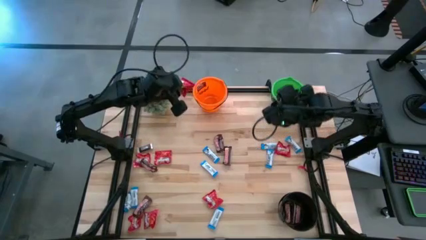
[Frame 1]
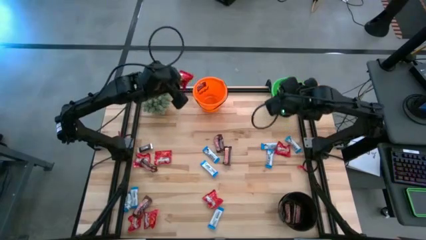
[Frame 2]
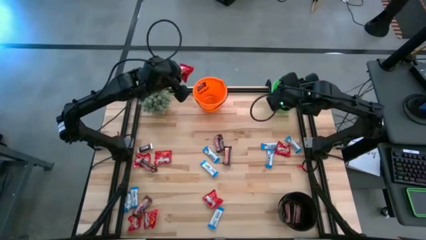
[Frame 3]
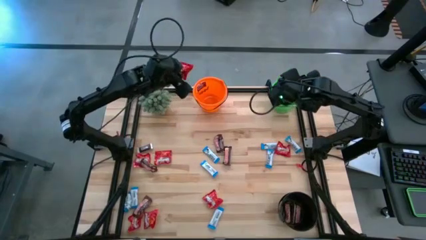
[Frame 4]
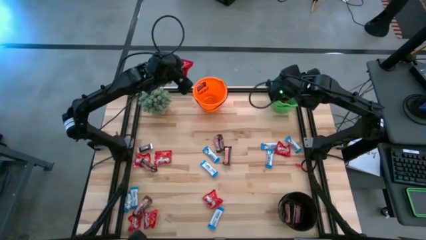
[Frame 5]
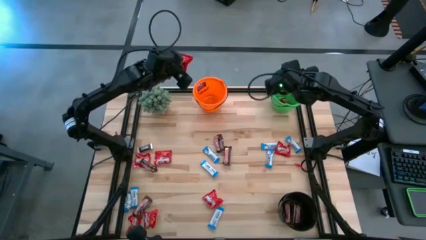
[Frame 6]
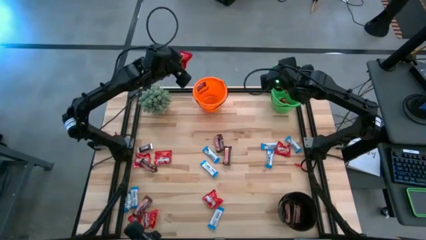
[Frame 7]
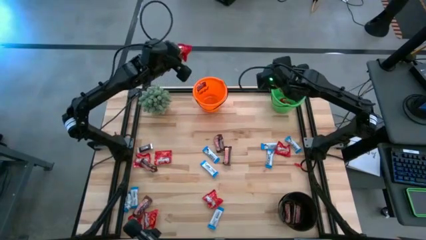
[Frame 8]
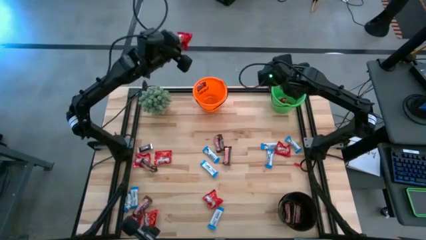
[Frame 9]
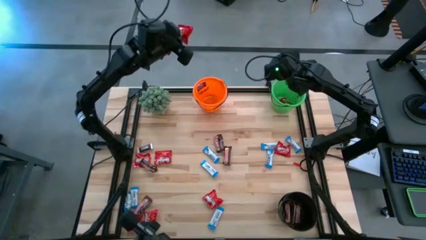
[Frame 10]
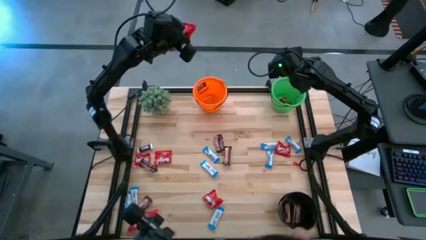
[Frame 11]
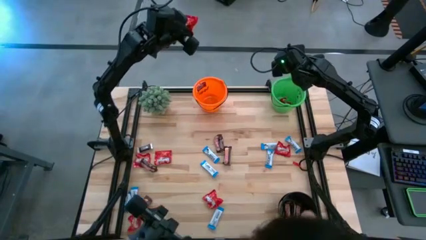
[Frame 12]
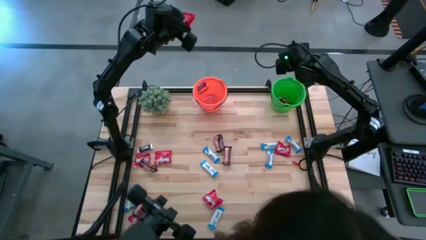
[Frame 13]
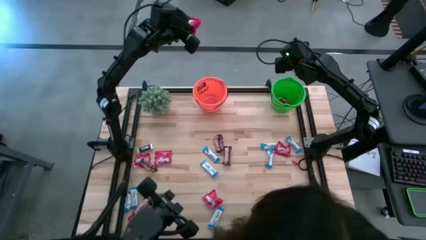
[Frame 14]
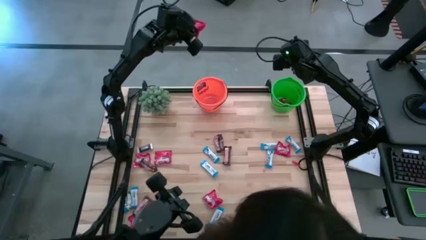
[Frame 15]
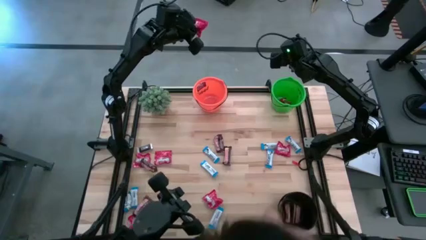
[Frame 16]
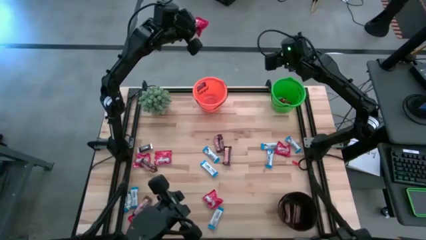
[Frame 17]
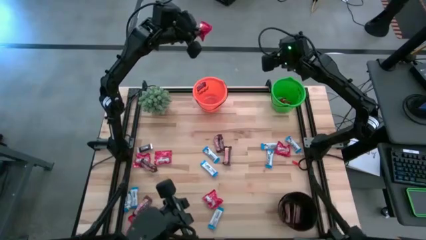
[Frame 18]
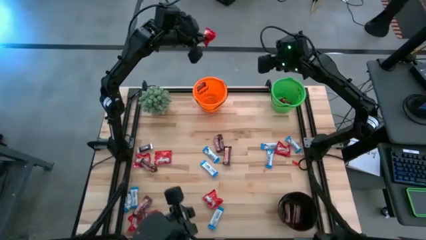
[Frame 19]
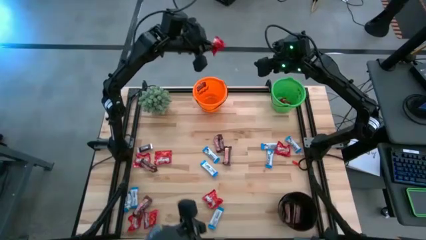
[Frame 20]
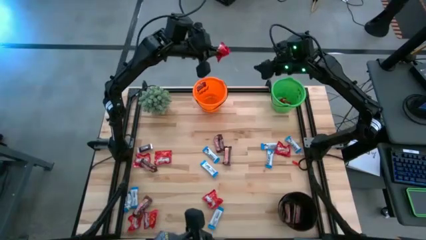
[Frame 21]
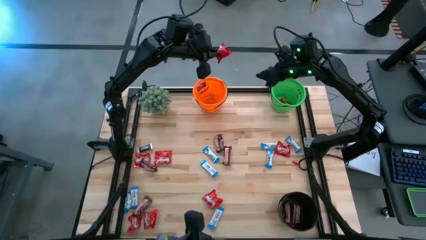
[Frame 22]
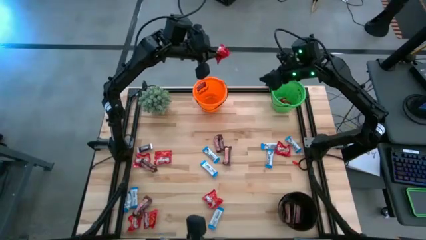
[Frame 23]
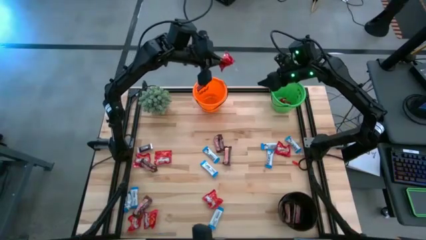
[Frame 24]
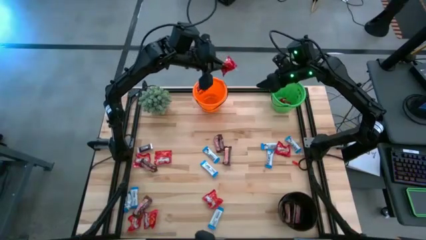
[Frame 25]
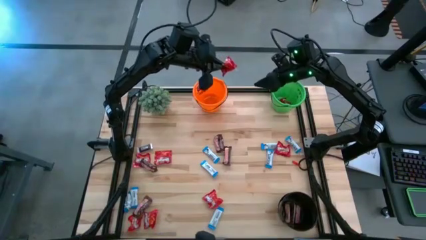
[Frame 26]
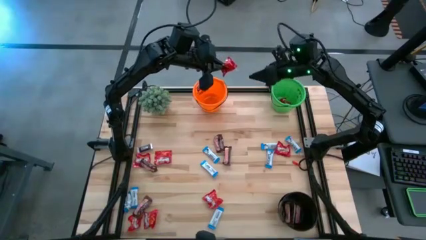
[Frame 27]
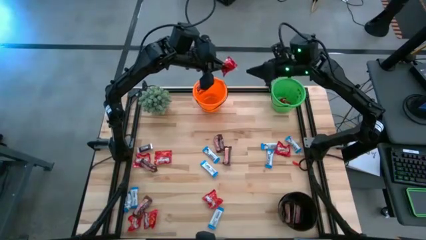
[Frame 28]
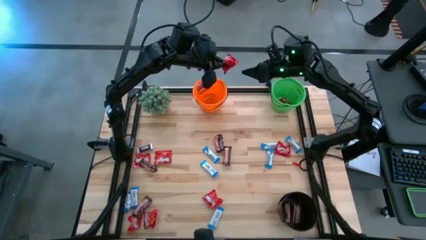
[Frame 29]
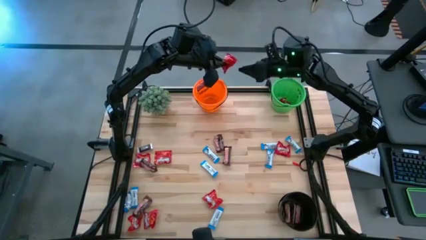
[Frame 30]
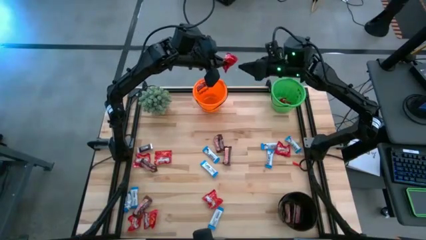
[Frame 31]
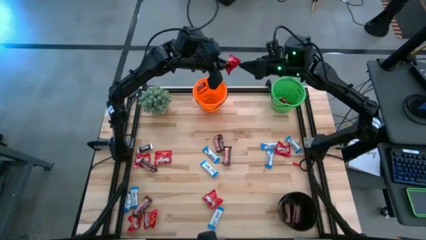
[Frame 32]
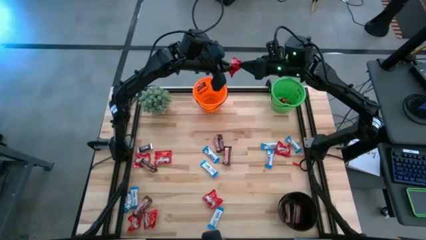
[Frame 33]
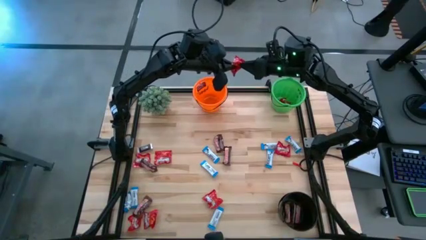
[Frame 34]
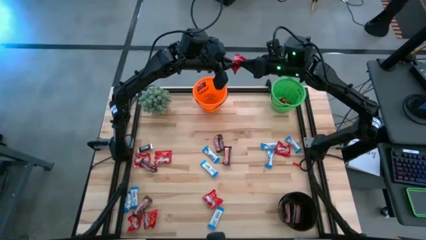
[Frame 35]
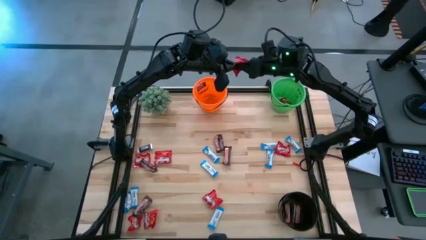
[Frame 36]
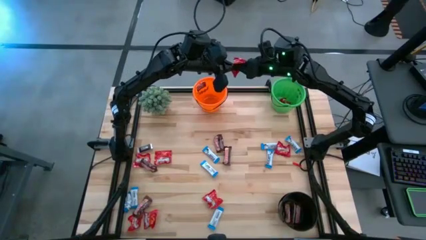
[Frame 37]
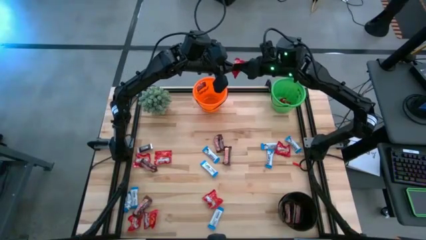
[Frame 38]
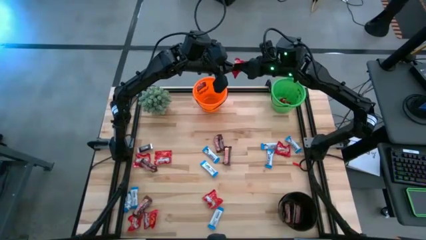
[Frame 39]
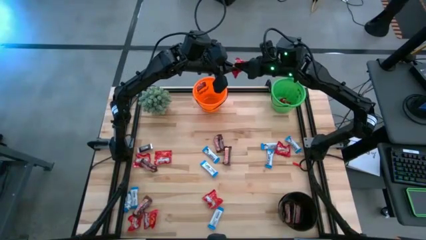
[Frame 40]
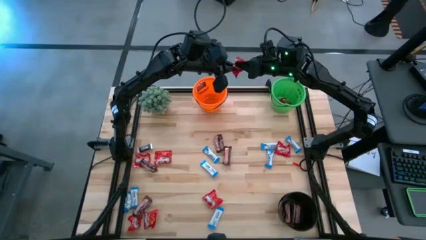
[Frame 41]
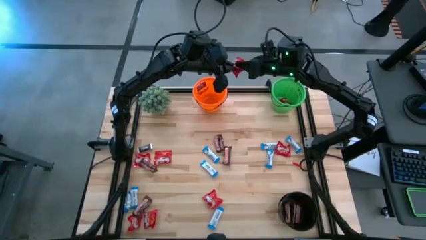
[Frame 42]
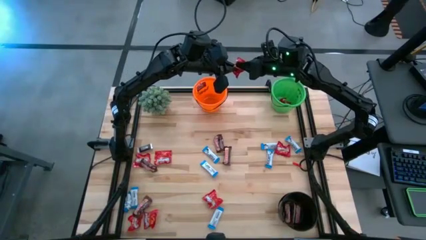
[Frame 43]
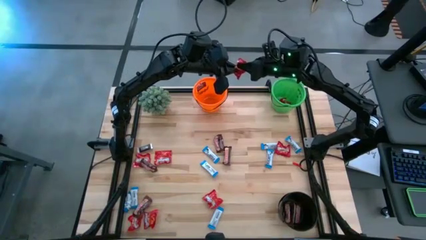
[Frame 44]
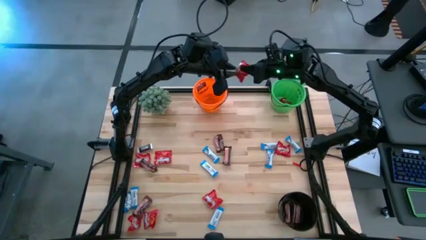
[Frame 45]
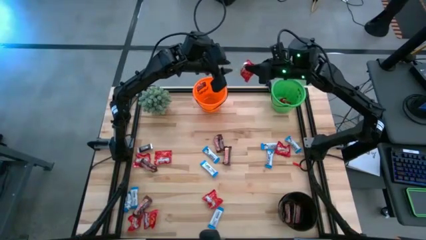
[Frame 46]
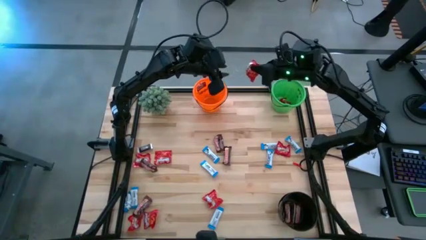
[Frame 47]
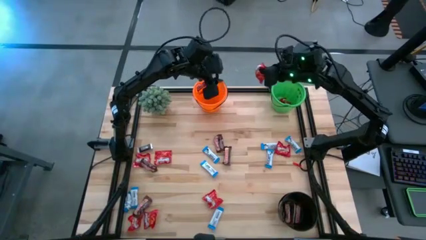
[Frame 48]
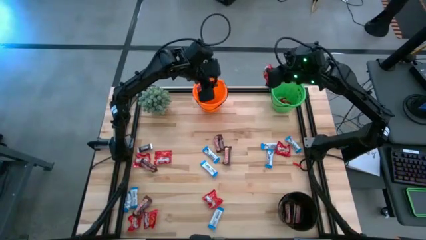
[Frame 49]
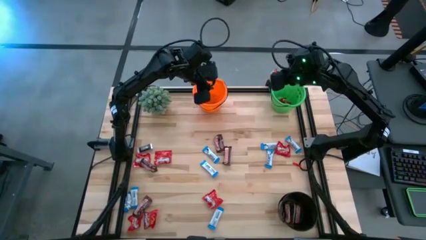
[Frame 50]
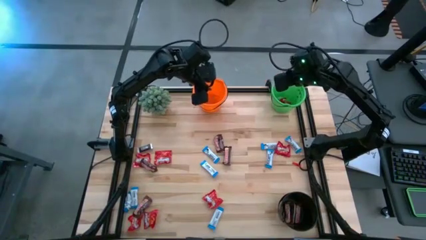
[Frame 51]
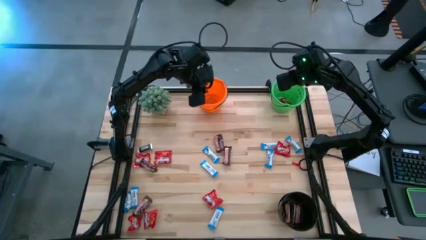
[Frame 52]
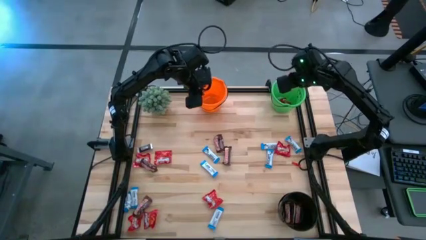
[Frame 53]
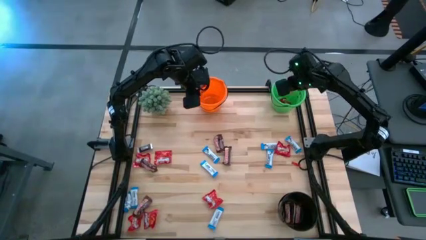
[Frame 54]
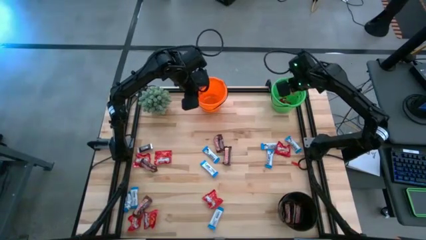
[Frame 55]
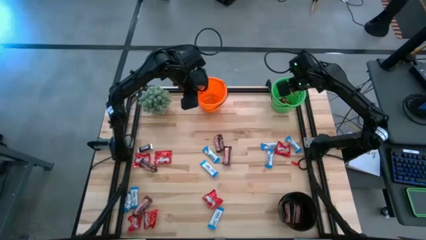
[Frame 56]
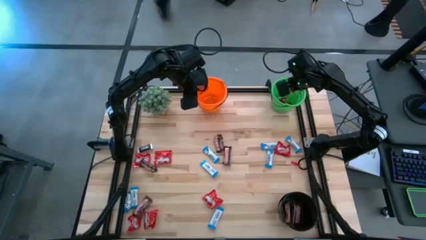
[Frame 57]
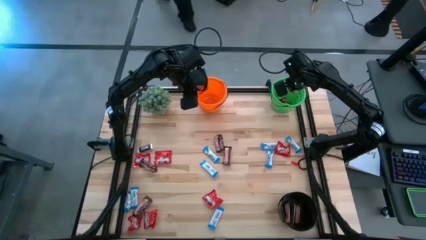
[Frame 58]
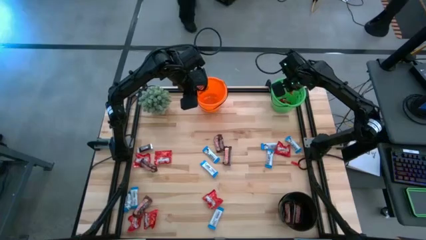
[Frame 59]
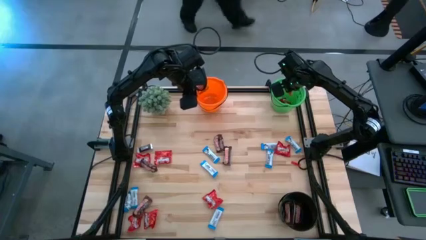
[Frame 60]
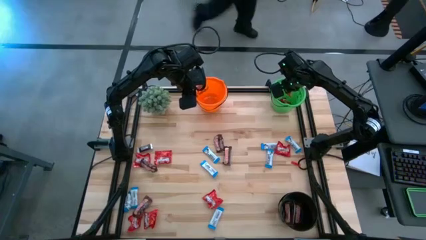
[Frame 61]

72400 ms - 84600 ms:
Task: Organize candy in baskets
Put the red candy into the green bucket
